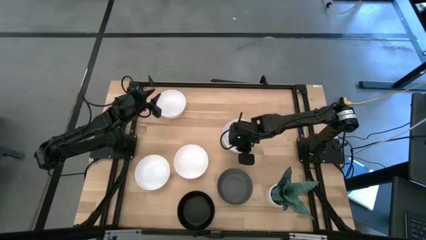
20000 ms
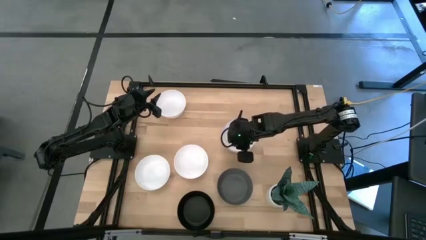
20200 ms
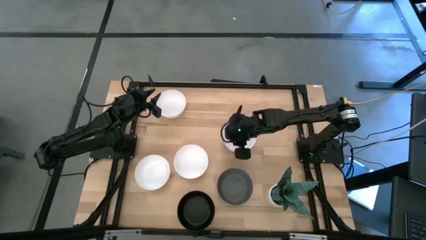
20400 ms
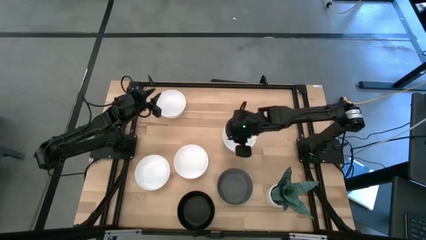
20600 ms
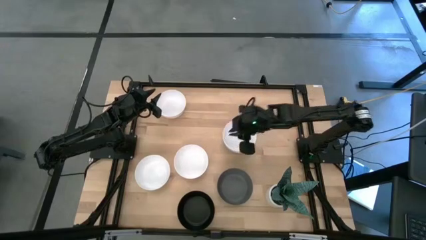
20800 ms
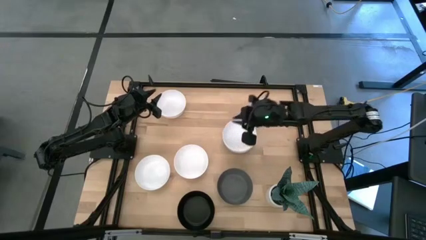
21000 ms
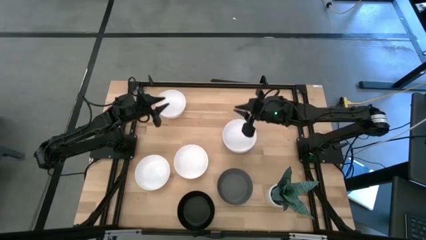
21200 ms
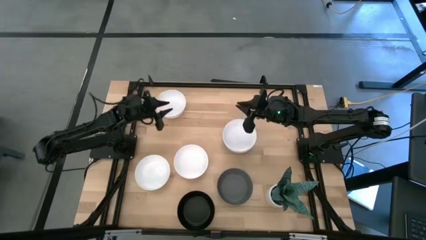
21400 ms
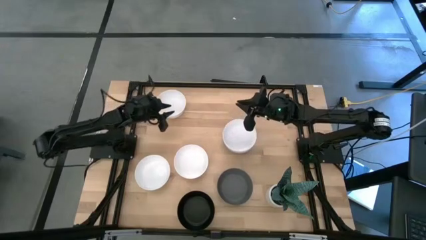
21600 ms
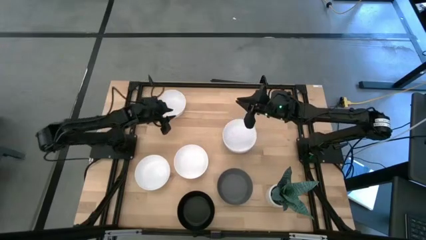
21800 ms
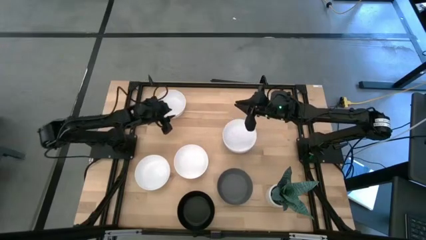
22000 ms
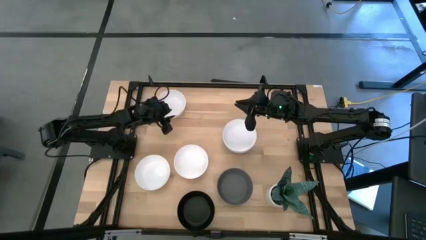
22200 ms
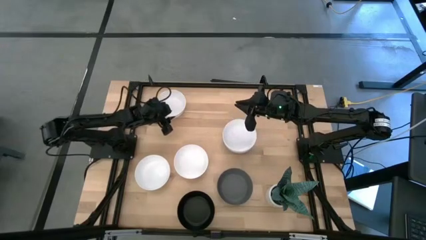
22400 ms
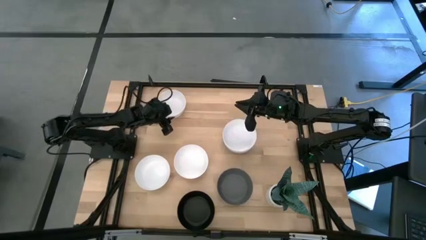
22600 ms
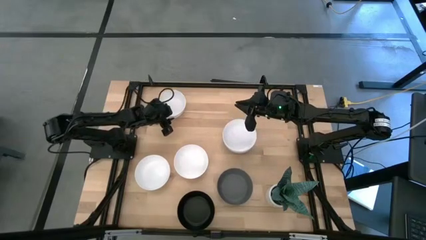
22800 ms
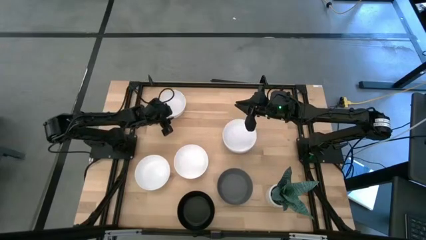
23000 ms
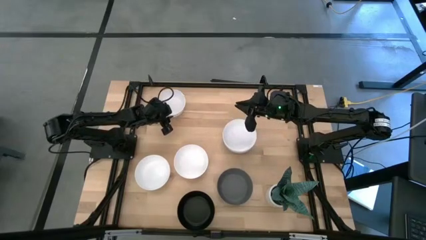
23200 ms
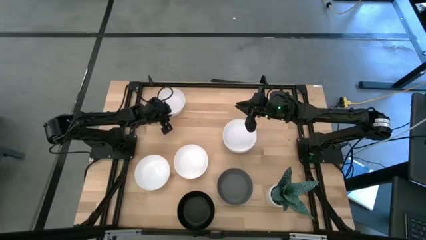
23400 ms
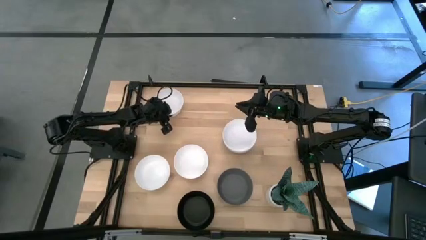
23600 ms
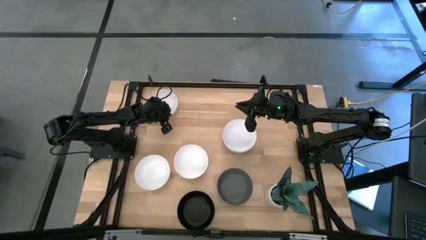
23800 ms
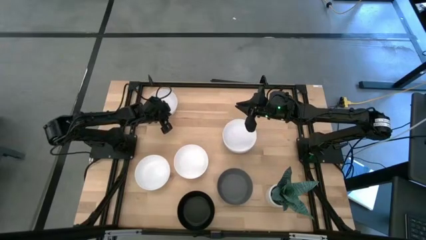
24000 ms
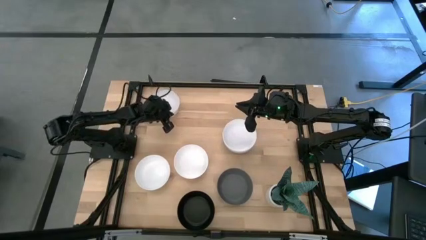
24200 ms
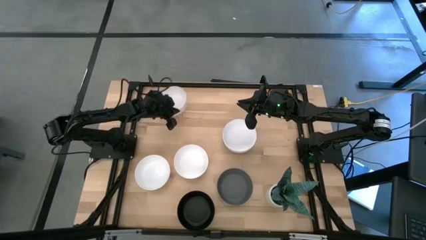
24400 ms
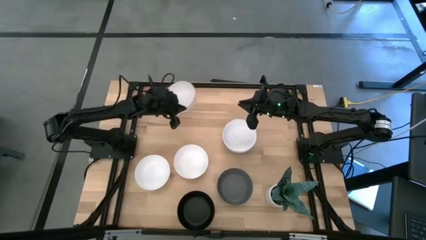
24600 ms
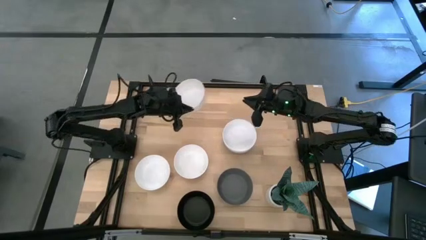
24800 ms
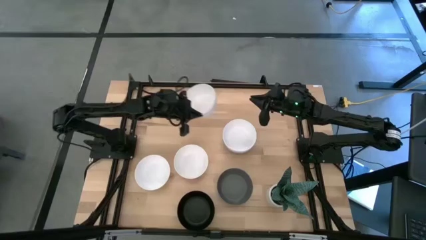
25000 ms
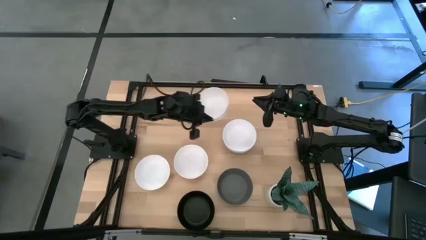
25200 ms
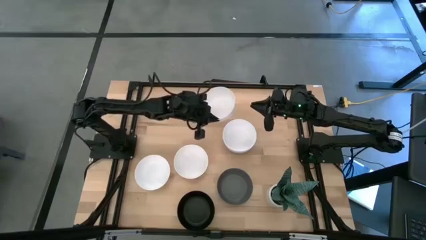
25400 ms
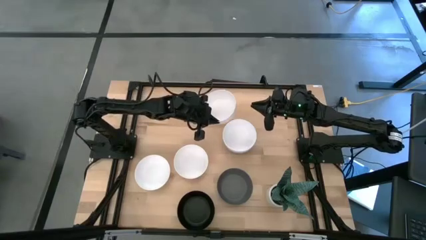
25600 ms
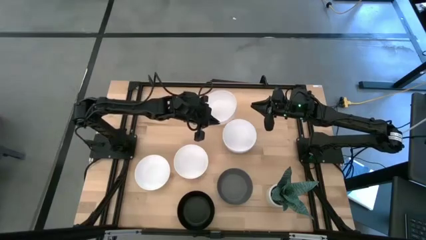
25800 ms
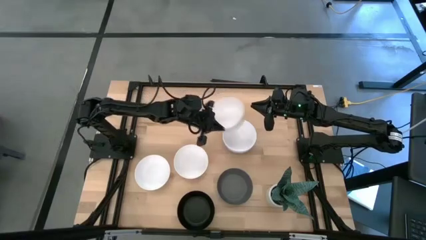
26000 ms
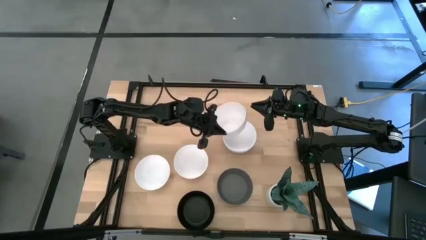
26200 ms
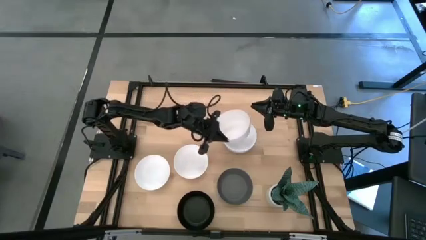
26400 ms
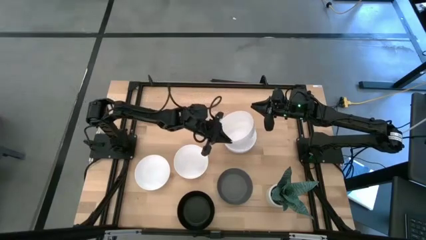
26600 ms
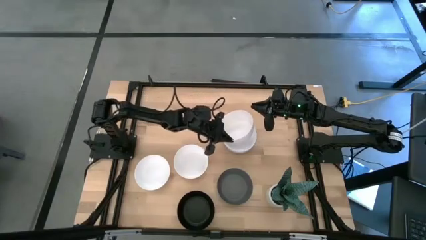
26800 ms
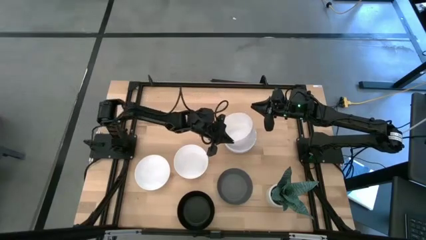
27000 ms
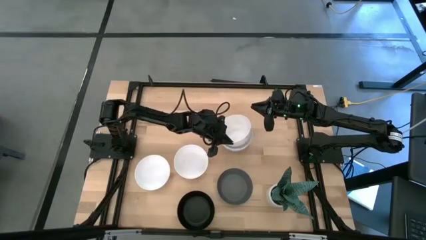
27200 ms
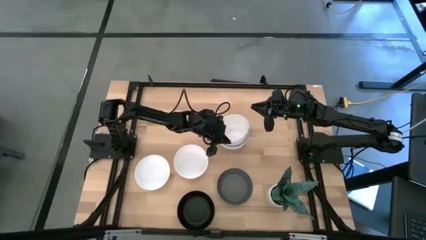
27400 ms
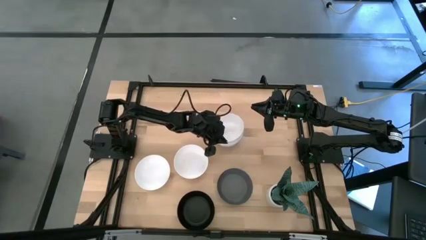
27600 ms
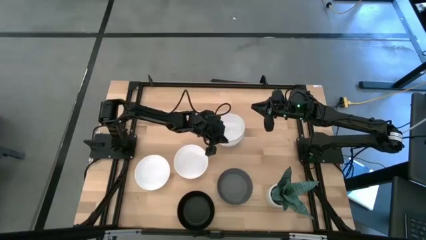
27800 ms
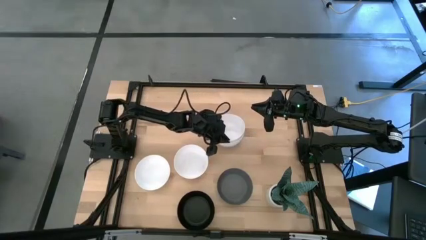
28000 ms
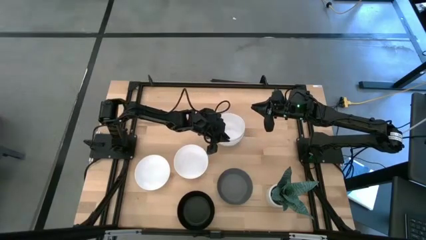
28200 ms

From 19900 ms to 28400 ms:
Task: Nest bowls inside each other
Stack the white bowl on the white bowl

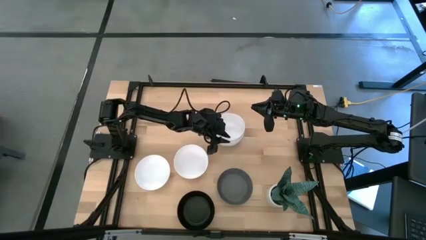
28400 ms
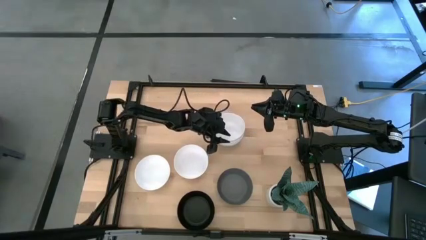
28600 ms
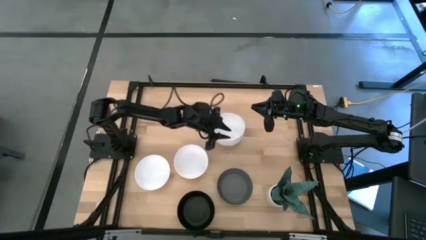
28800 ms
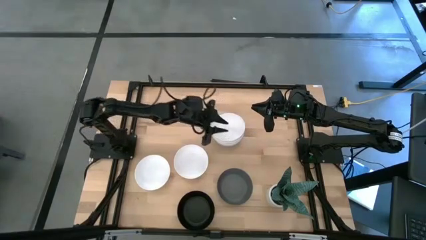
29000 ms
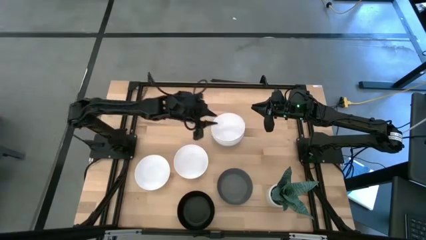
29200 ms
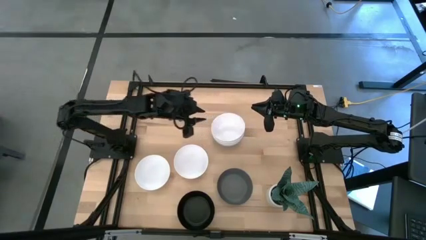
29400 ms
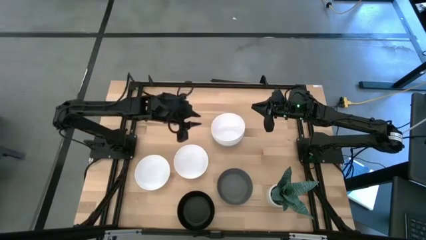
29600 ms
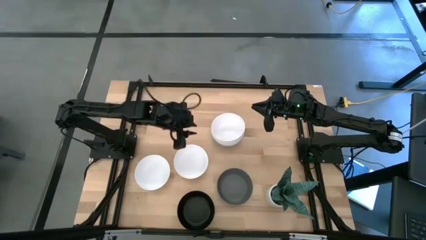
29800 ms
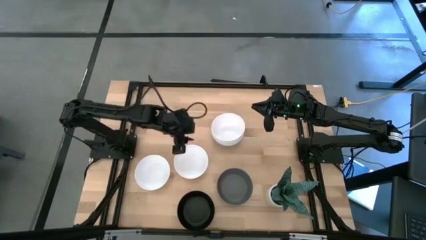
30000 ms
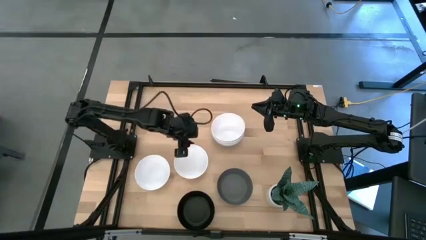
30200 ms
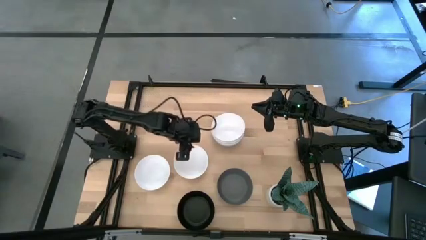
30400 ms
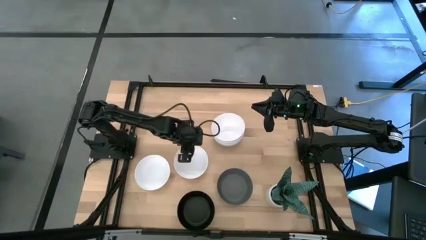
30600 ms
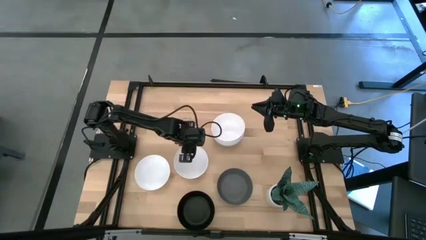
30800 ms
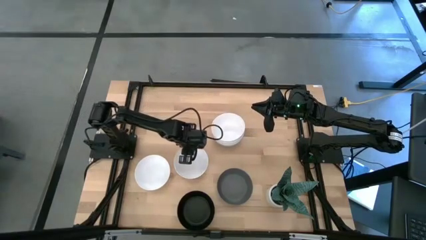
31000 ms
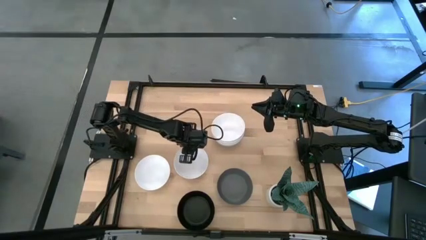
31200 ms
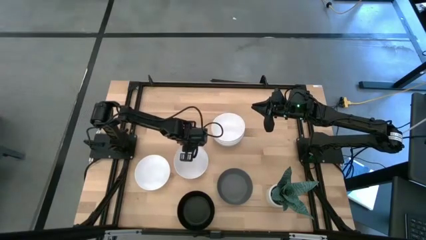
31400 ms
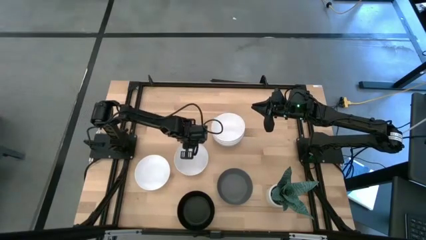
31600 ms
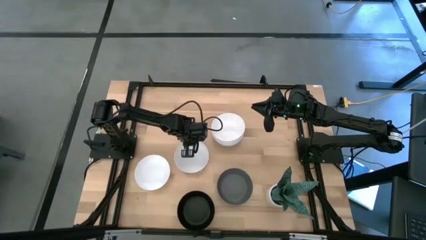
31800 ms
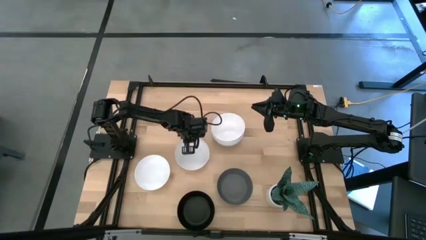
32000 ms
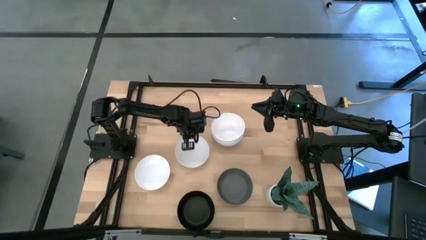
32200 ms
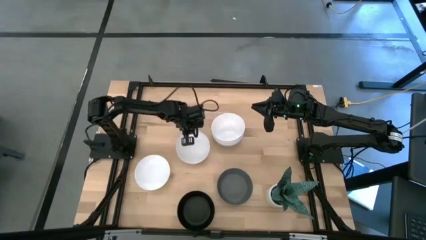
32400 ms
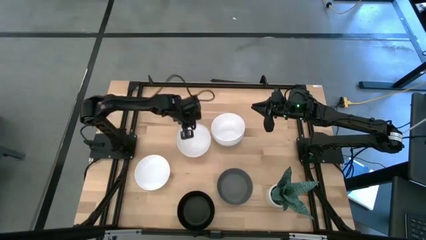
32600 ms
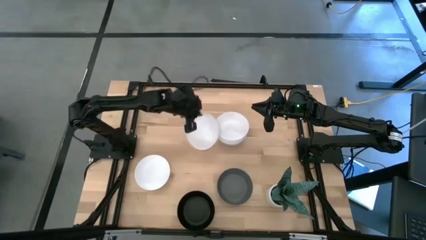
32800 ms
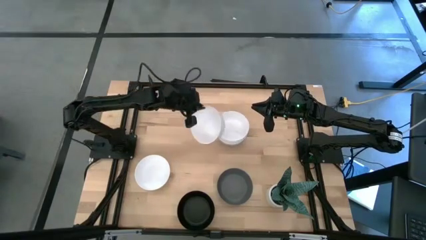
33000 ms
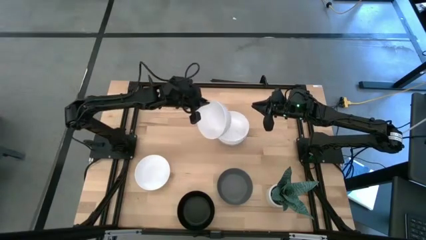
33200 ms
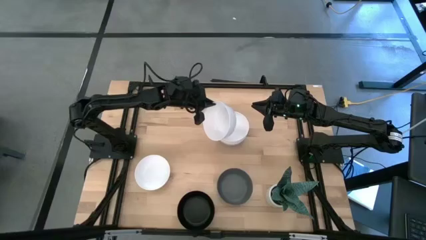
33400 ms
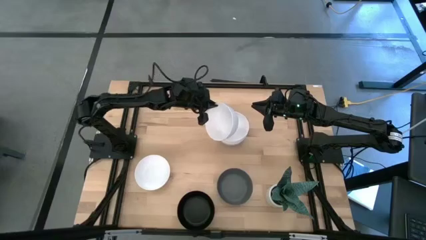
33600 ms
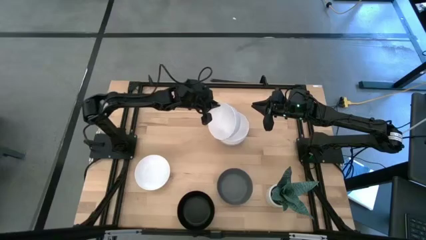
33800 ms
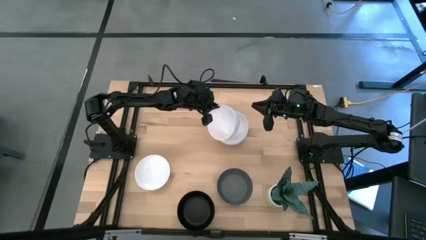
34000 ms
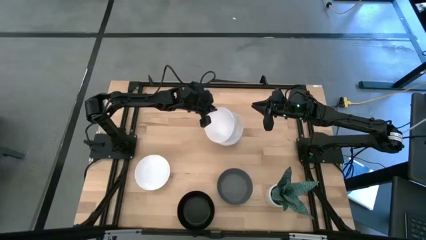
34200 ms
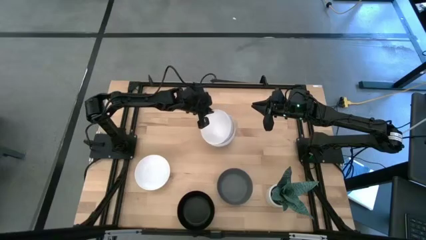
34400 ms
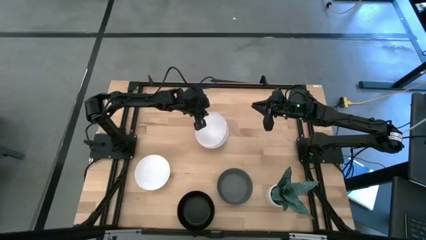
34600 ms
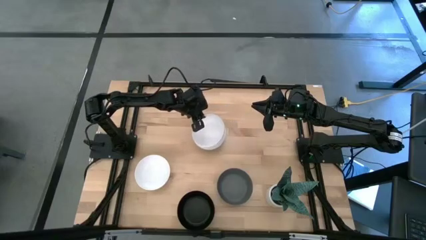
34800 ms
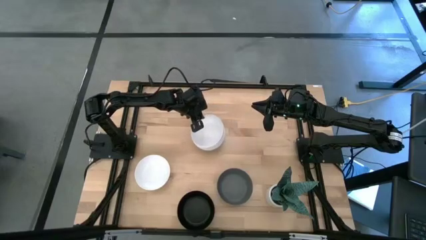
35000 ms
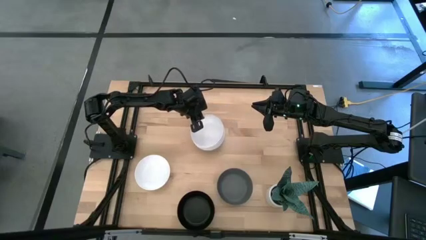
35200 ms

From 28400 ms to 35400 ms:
Stack the white bowl on the white bowl

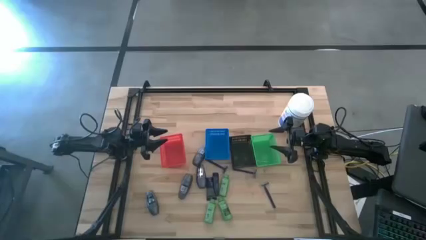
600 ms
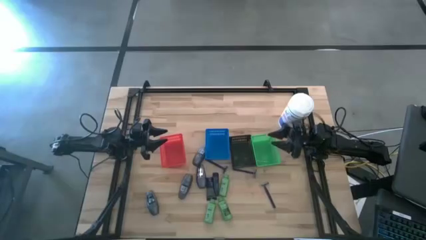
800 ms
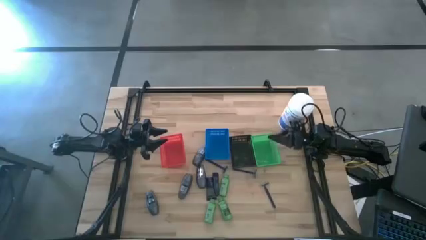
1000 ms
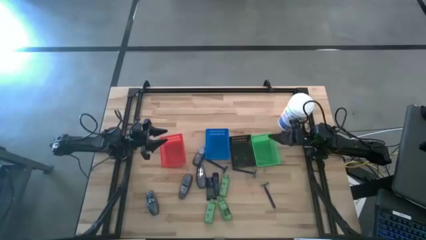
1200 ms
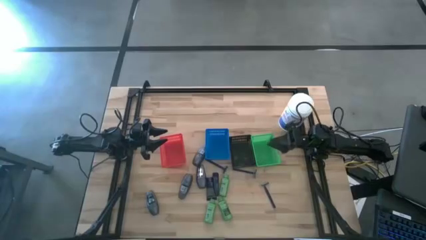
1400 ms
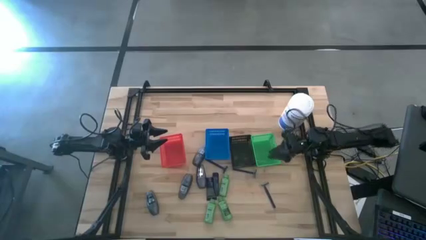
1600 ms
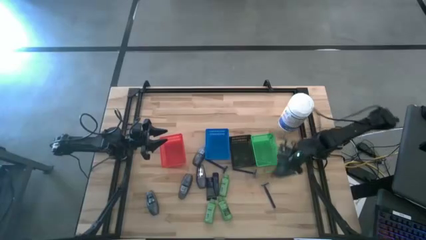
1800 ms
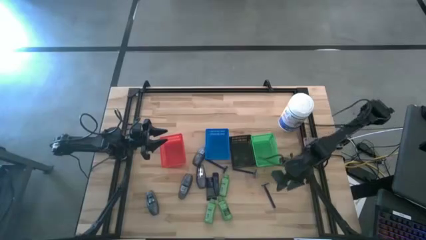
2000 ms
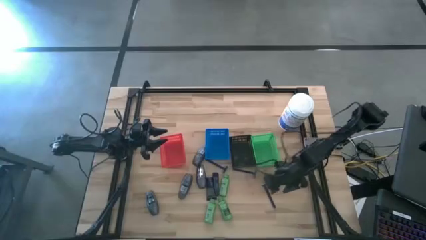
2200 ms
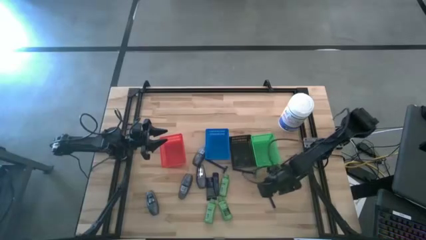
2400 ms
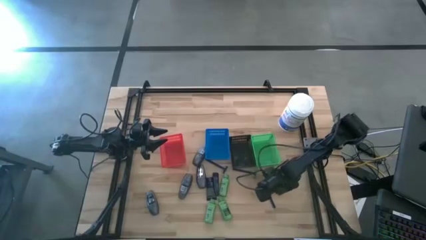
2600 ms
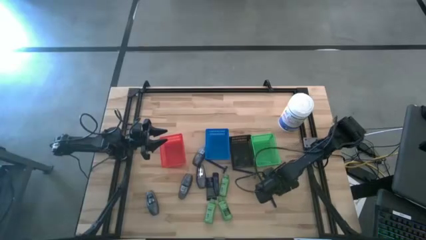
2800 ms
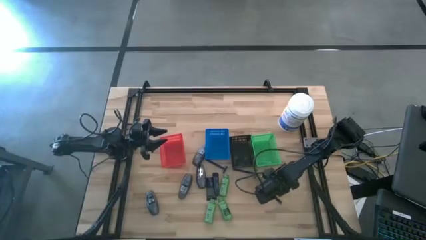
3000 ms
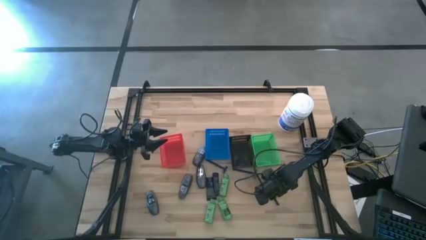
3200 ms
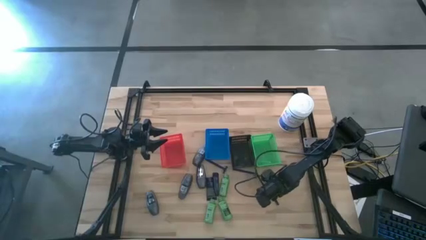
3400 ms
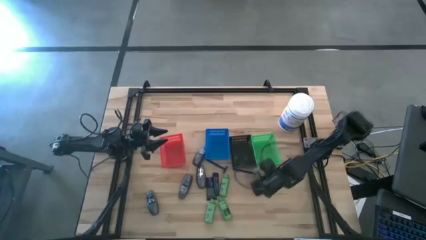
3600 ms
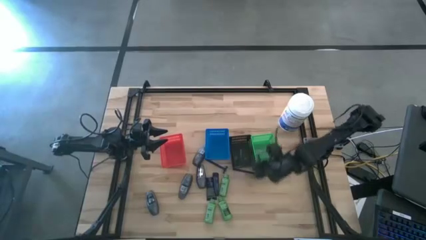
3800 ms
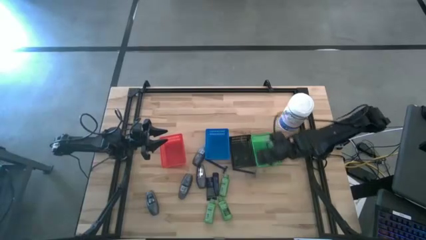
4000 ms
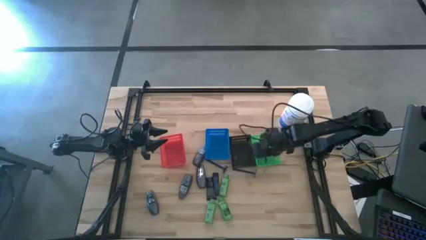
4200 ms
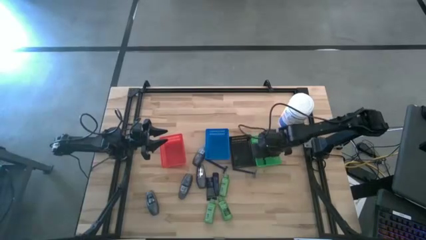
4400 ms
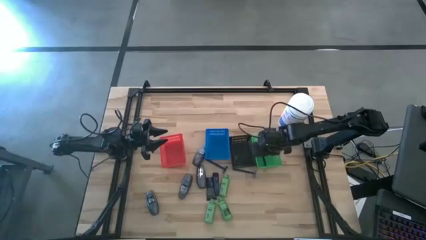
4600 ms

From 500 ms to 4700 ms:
Task: Pick & Place Travel size toiletries
Put the blue razor into the green bin
